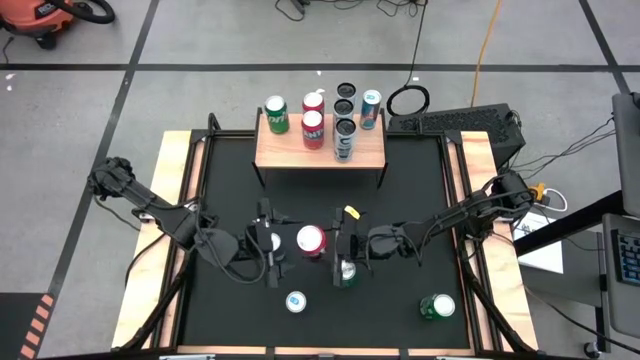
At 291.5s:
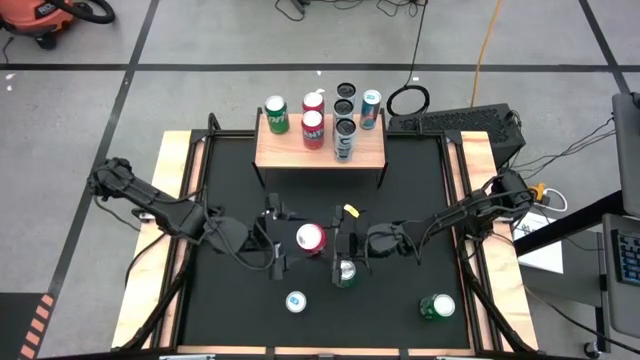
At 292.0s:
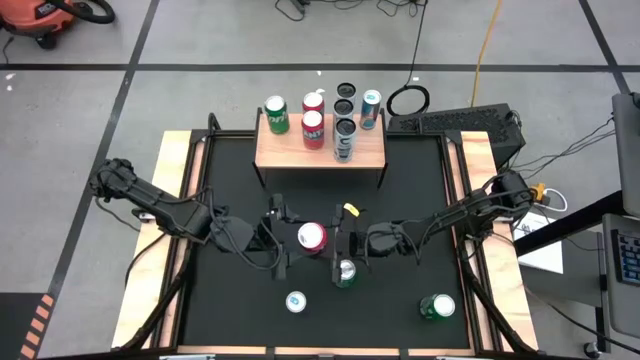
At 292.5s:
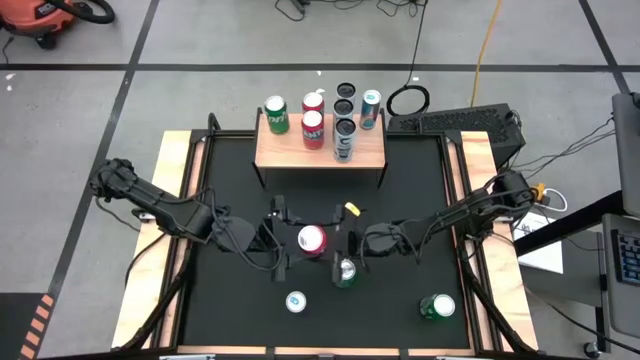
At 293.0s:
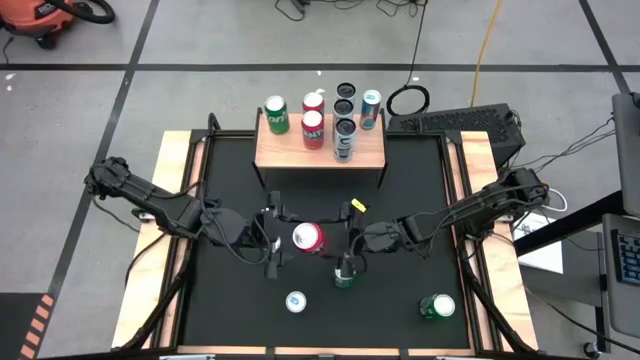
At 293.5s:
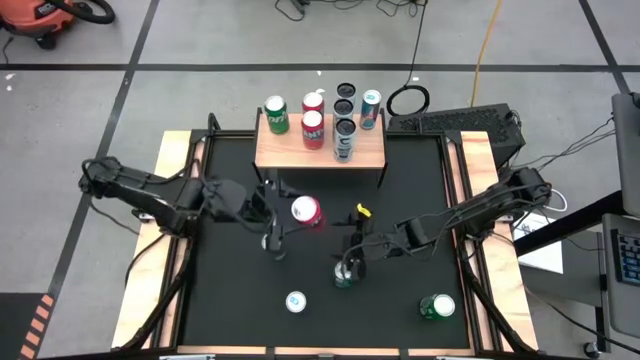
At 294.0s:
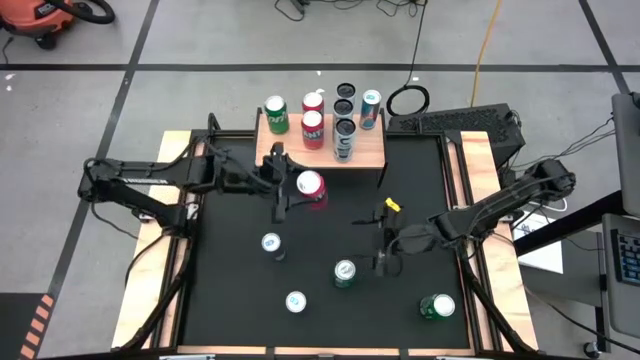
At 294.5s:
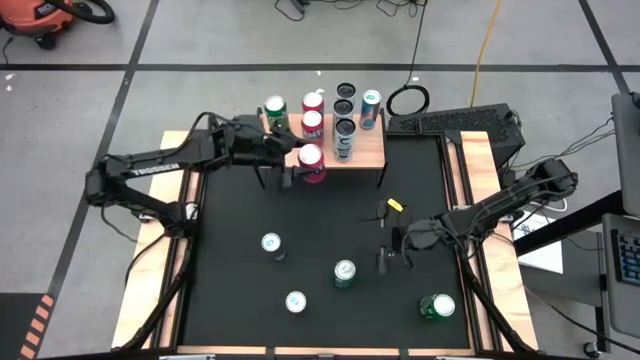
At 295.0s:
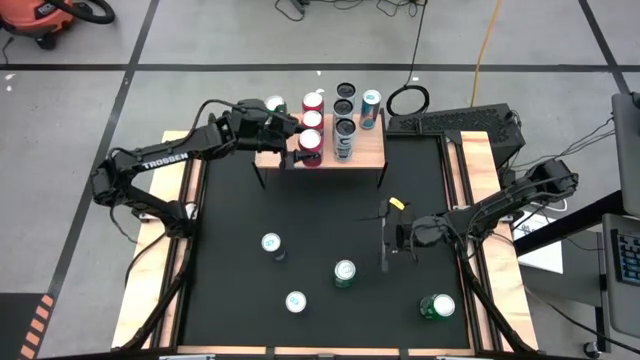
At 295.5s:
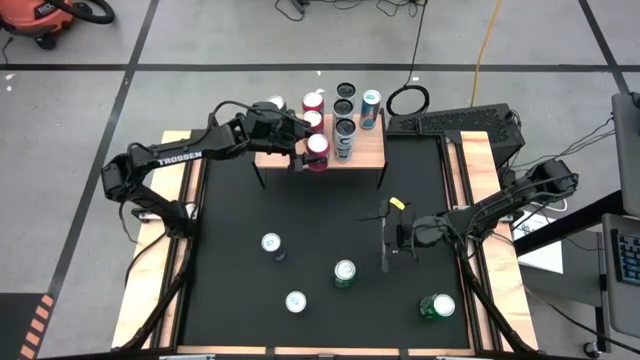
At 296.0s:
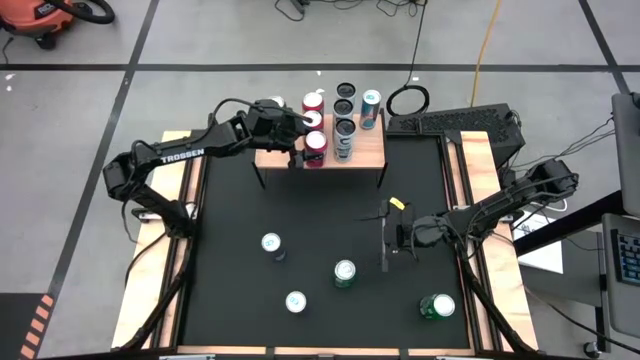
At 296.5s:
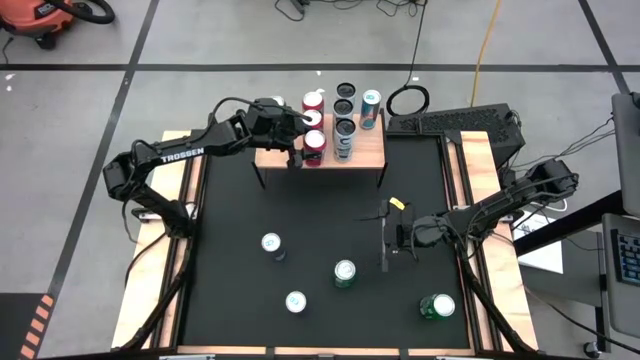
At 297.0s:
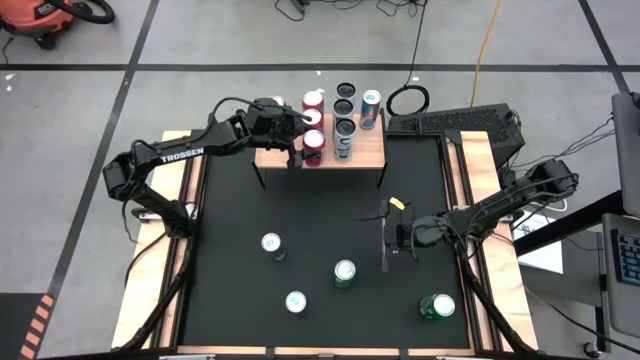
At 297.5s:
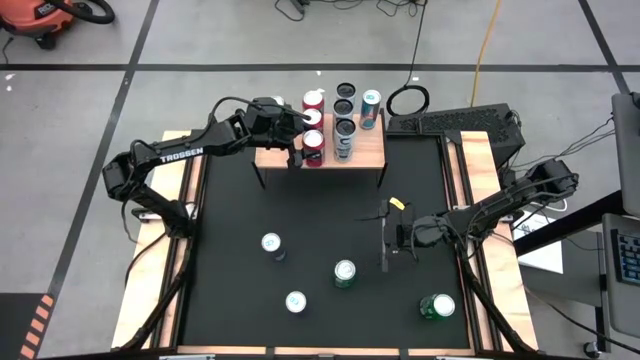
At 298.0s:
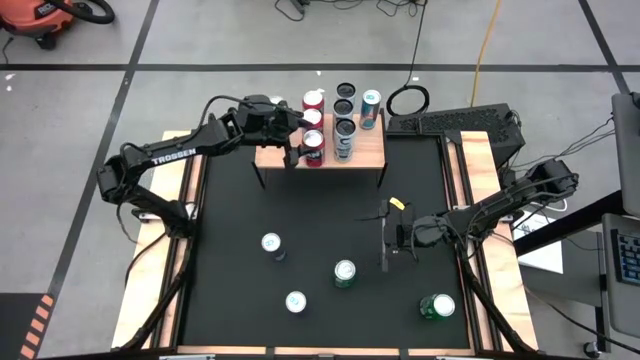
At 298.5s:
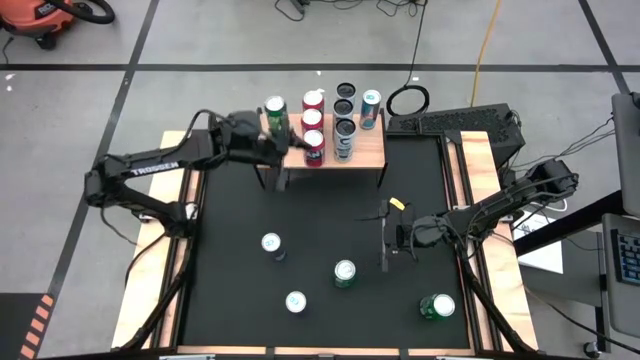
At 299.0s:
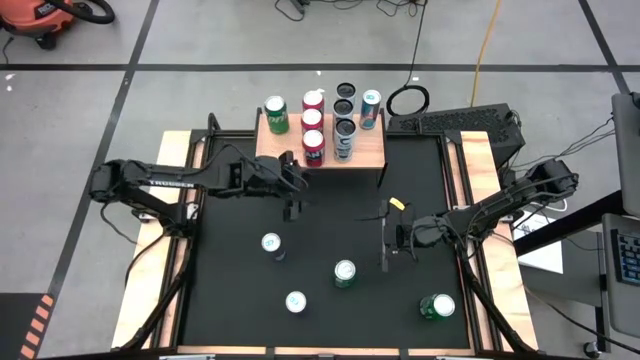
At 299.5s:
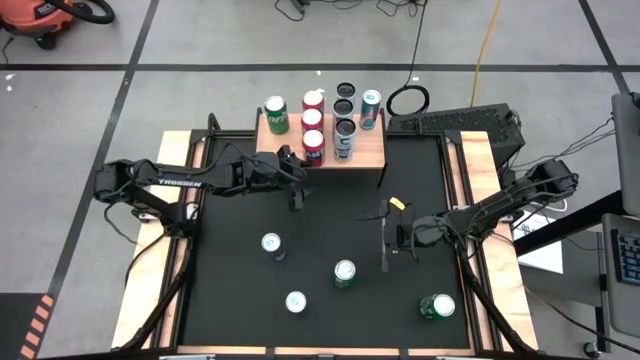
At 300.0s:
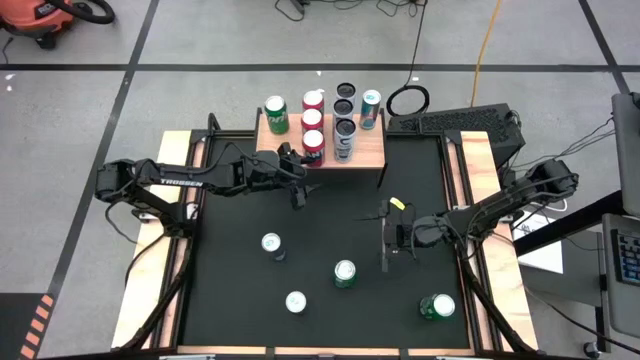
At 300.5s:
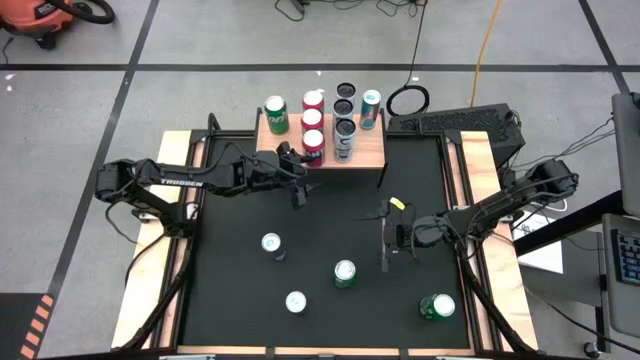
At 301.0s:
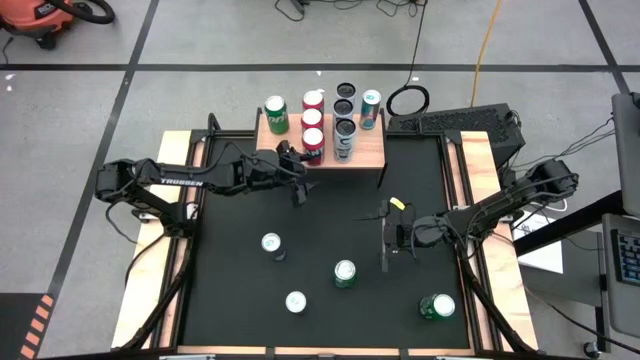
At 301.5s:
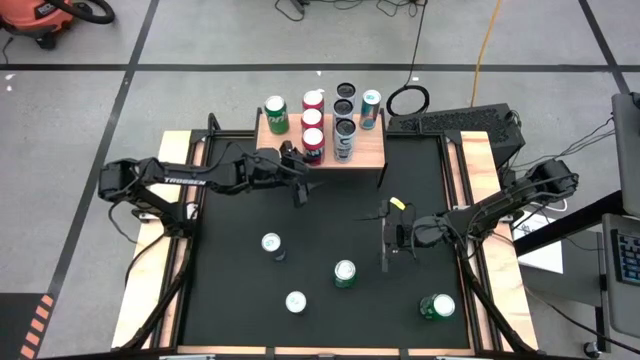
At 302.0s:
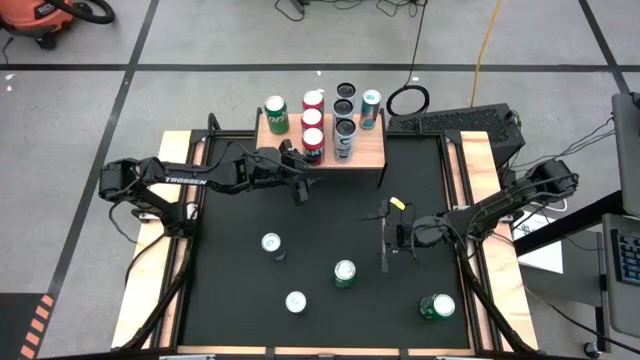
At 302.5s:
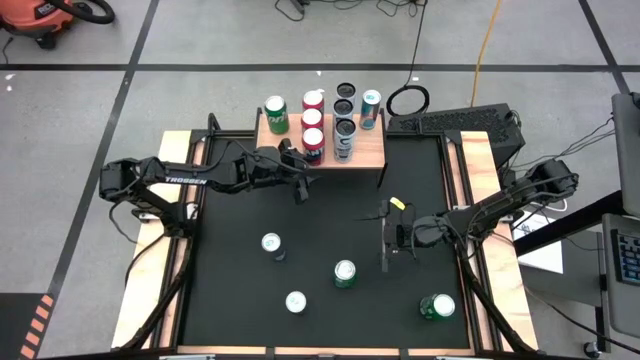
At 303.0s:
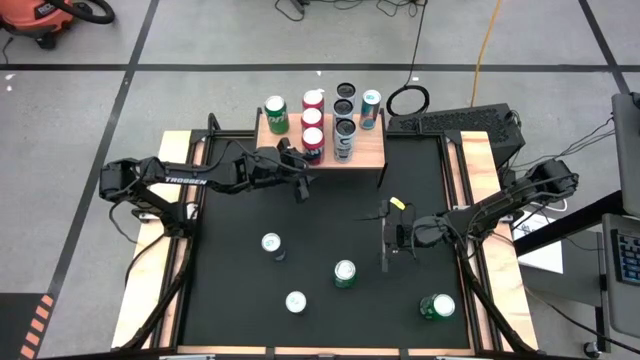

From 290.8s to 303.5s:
Task: Place canned beverage on shelf
Put the orange soda can on the shelf aligned with the other orange soda can

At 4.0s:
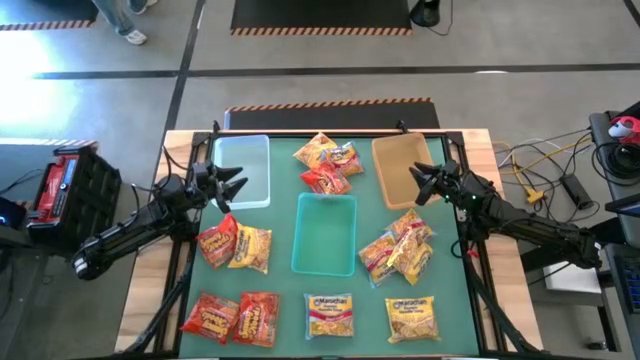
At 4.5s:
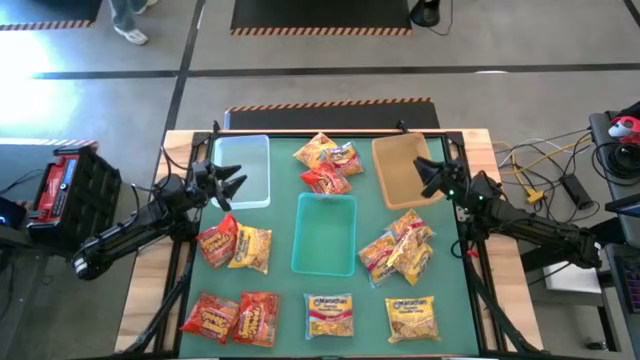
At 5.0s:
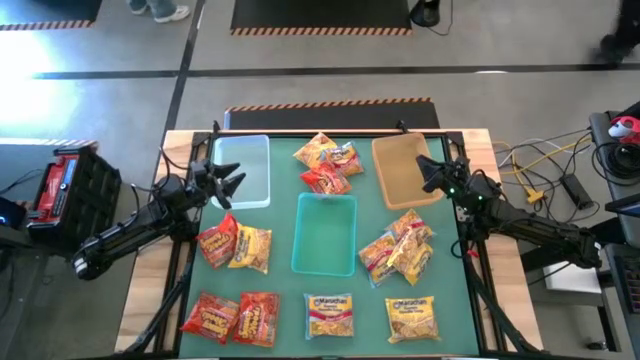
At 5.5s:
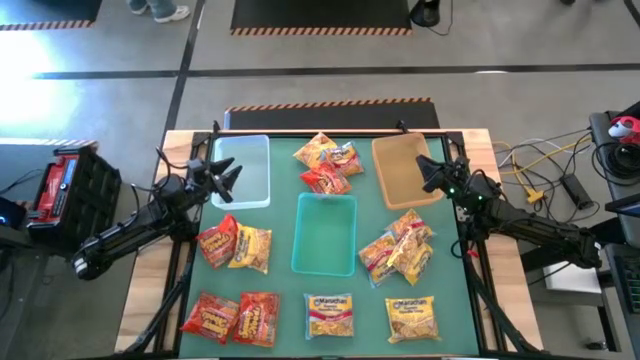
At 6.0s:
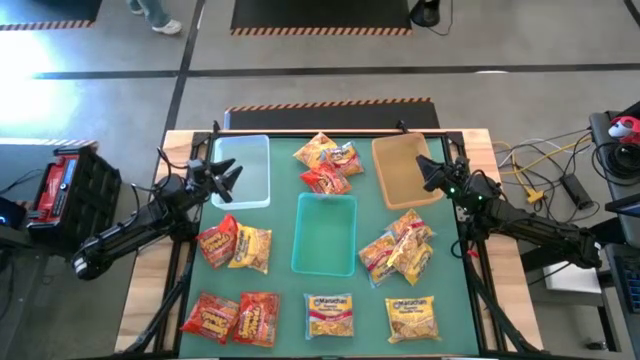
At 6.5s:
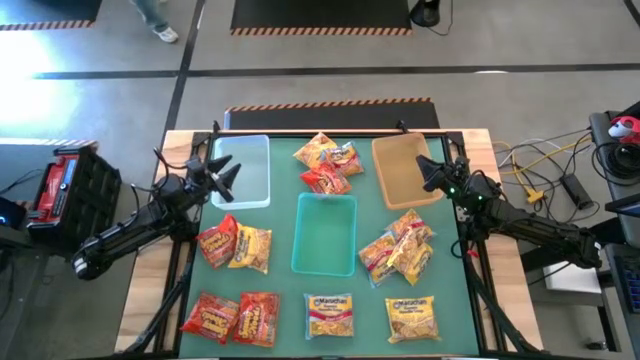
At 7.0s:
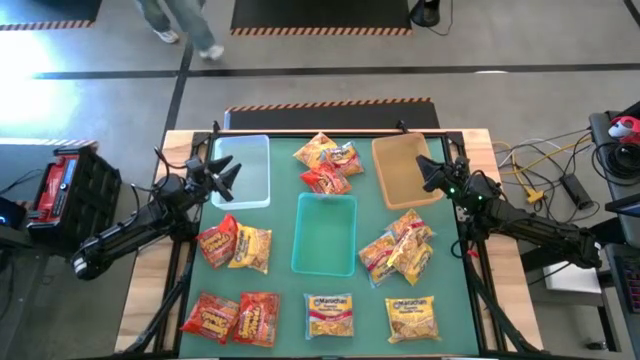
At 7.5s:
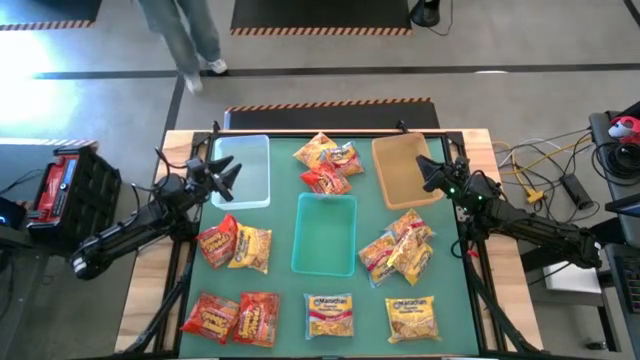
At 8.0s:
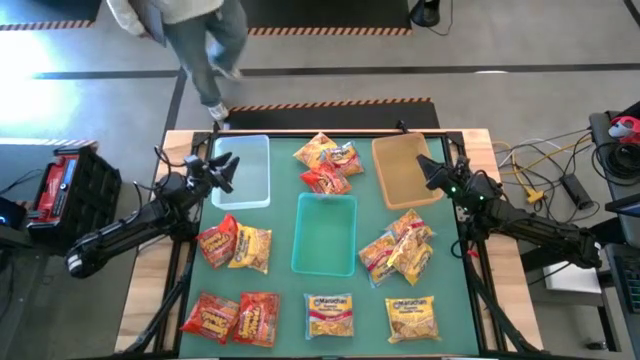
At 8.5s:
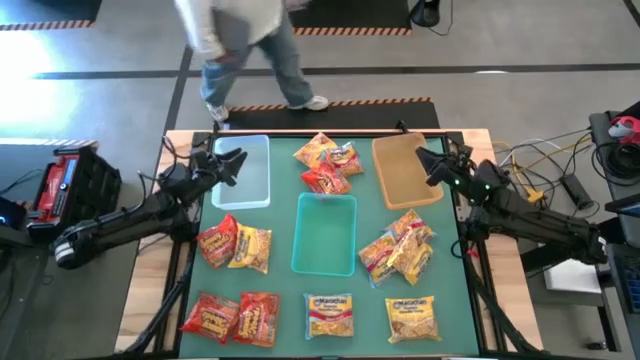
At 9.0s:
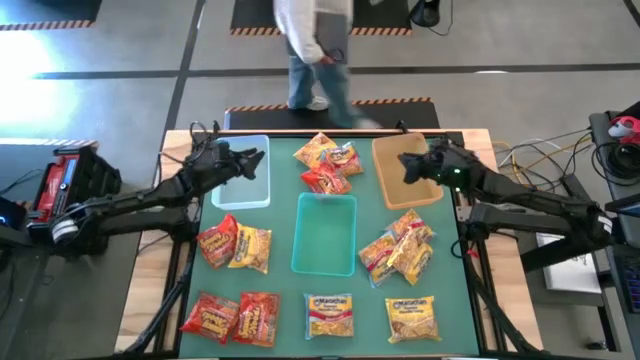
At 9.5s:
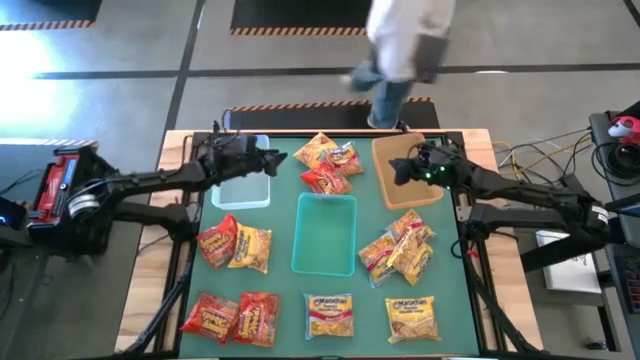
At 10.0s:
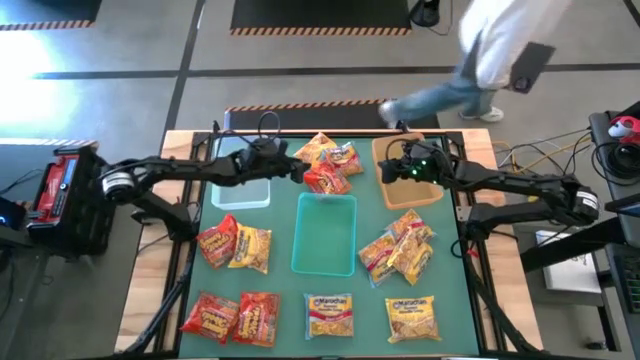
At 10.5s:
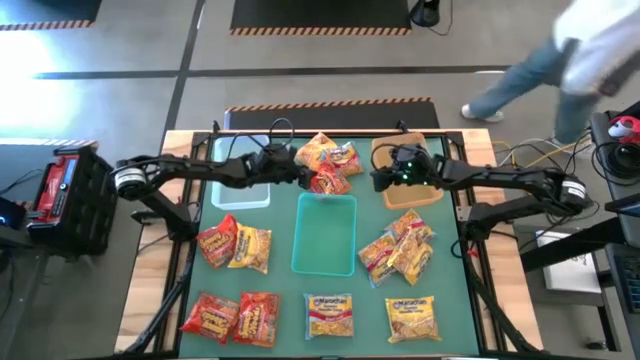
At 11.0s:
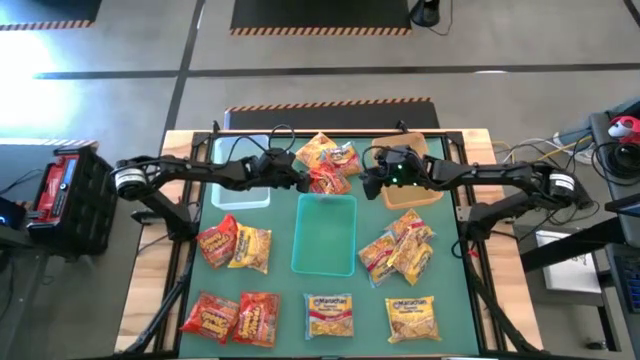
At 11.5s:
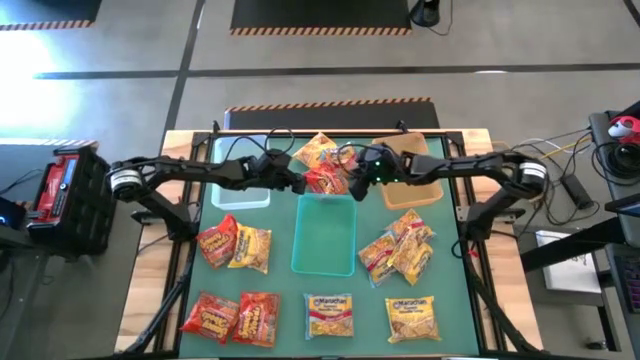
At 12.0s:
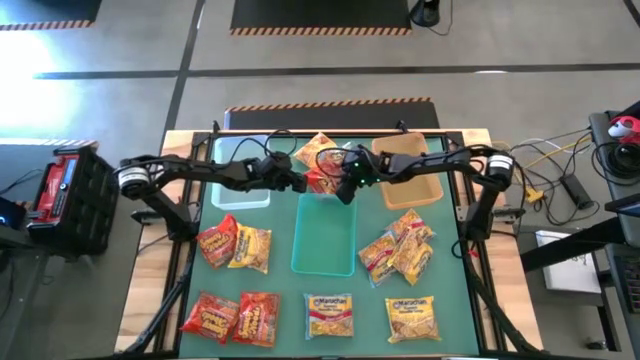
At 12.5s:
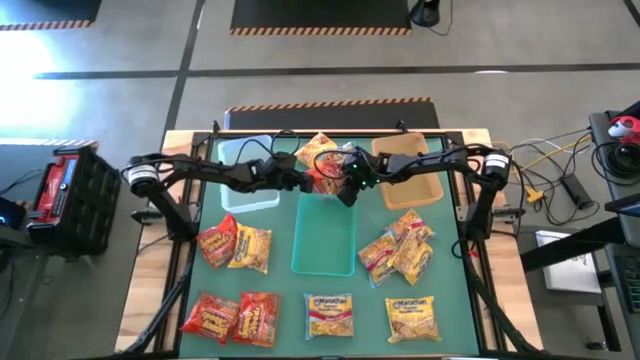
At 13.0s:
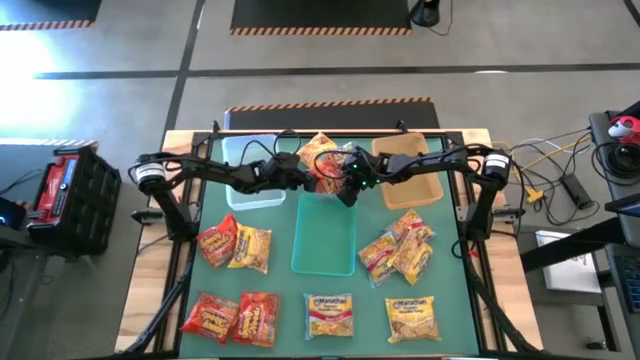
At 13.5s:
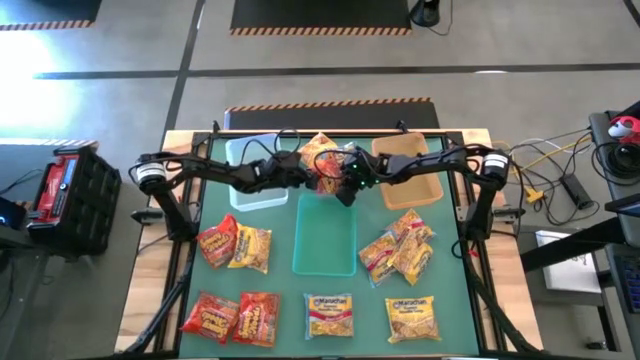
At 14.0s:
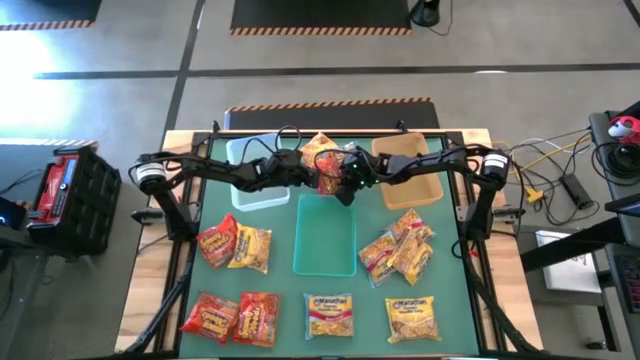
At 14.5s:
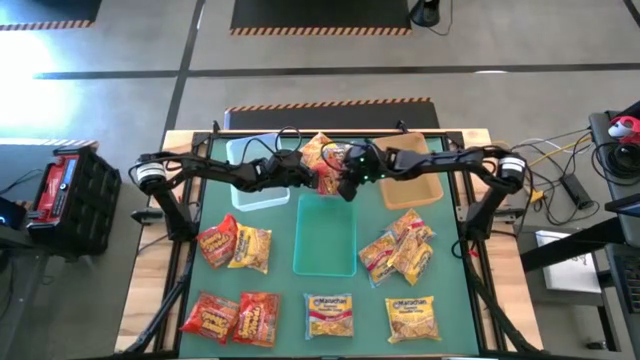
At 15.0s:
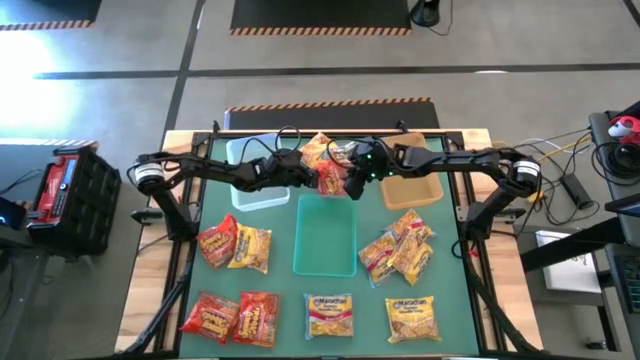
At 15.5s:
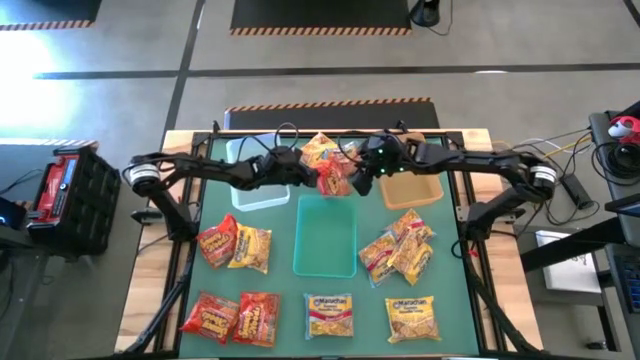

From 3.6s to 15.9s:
Task: Sort Maruchan noodles
Put the orange noodle pack into the transparent bin
